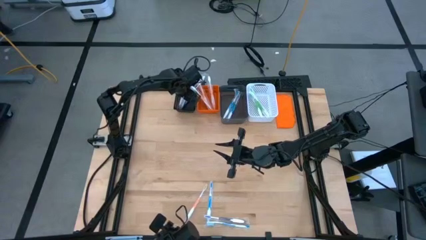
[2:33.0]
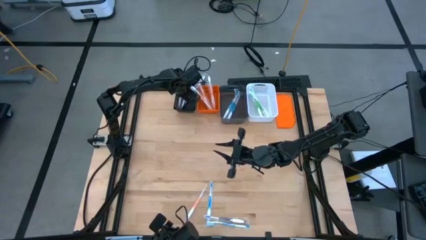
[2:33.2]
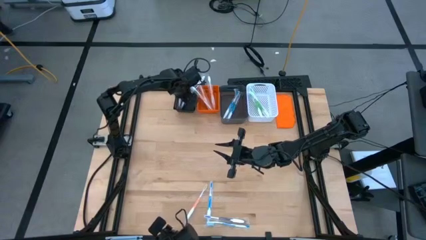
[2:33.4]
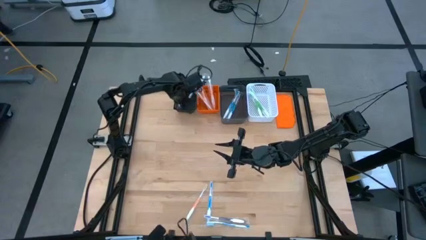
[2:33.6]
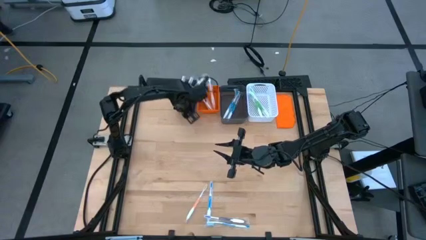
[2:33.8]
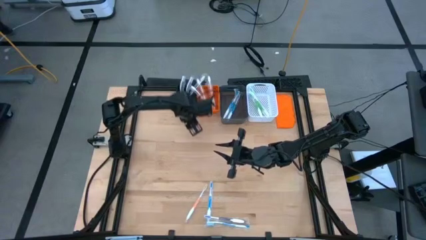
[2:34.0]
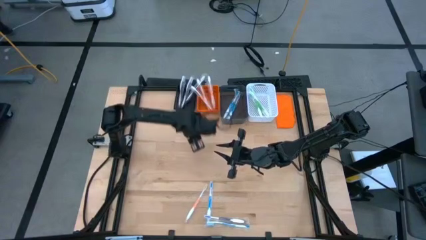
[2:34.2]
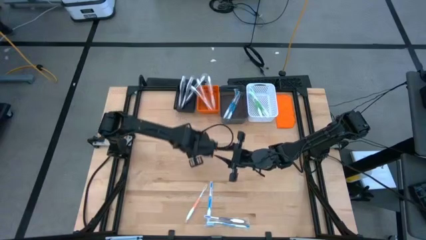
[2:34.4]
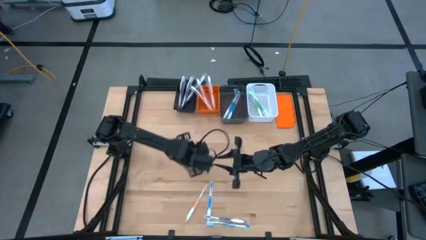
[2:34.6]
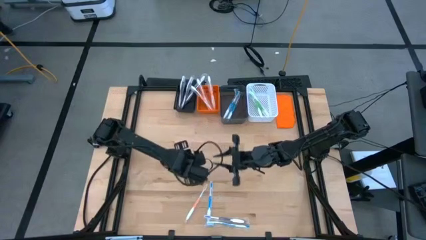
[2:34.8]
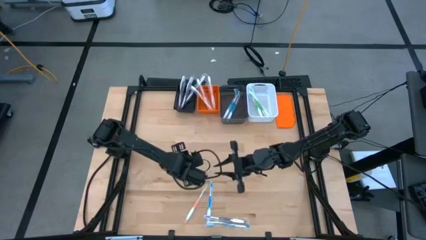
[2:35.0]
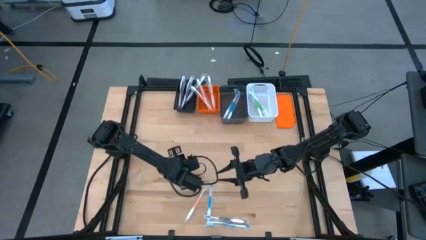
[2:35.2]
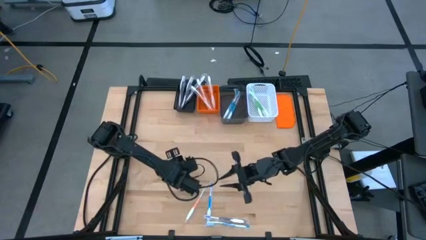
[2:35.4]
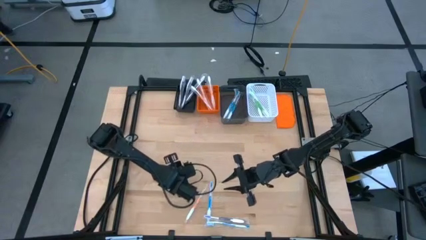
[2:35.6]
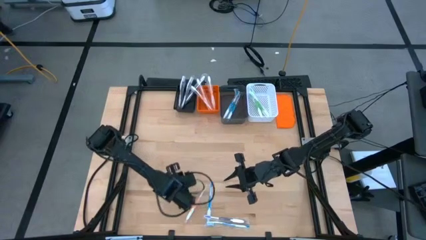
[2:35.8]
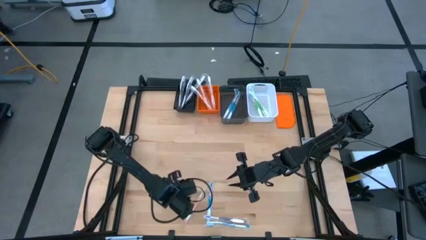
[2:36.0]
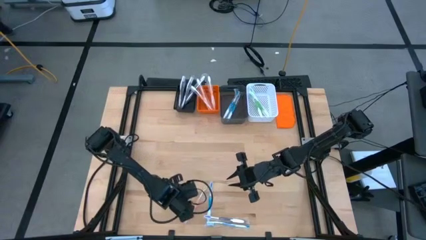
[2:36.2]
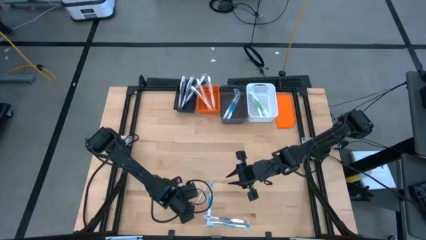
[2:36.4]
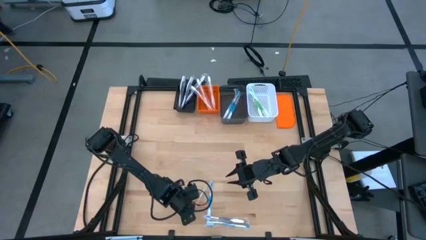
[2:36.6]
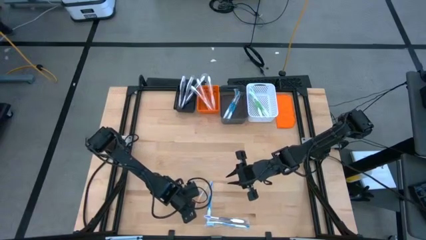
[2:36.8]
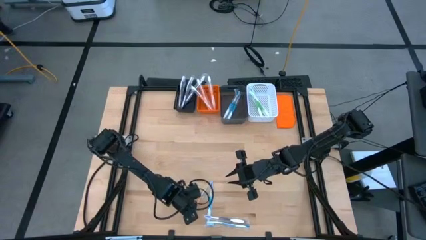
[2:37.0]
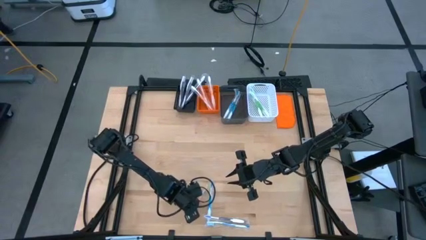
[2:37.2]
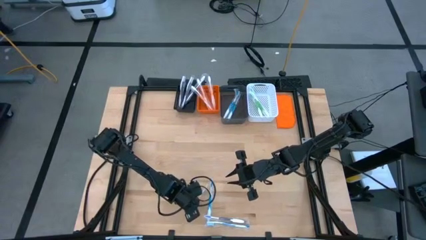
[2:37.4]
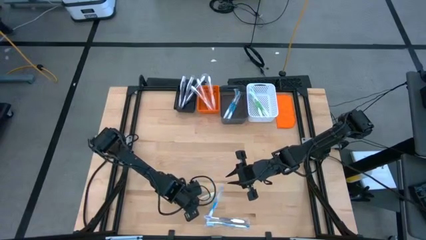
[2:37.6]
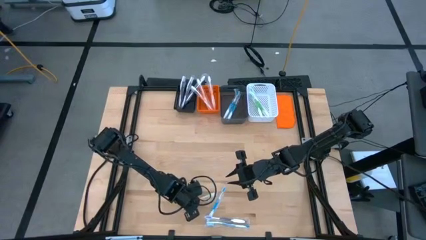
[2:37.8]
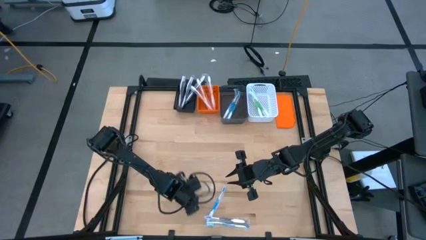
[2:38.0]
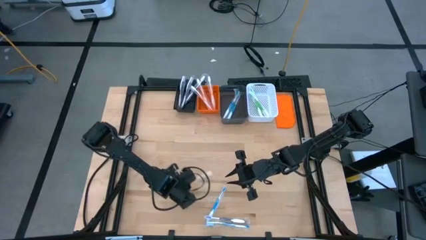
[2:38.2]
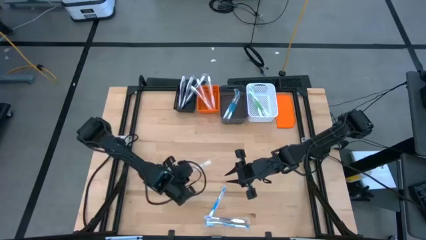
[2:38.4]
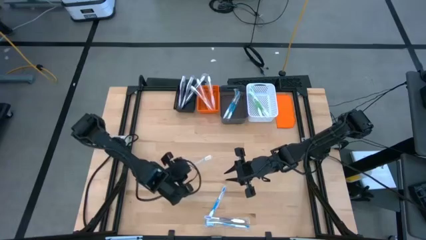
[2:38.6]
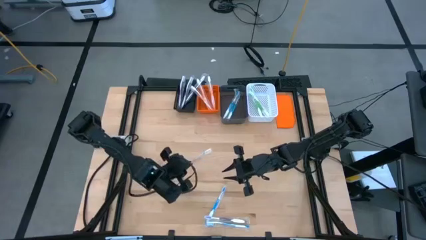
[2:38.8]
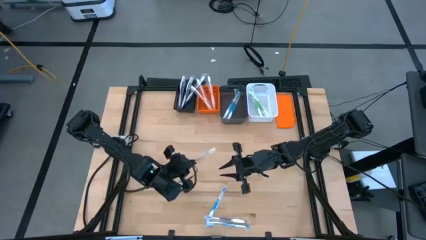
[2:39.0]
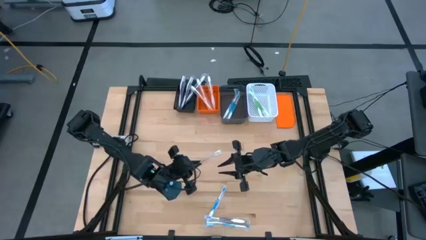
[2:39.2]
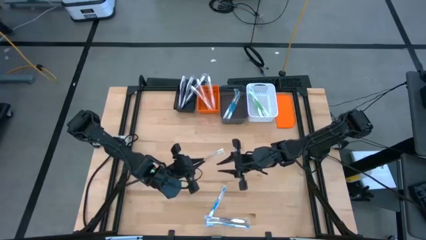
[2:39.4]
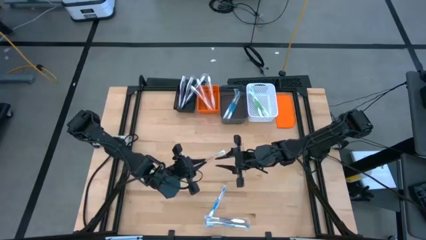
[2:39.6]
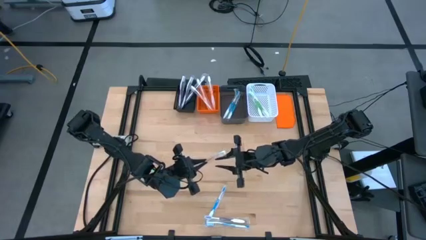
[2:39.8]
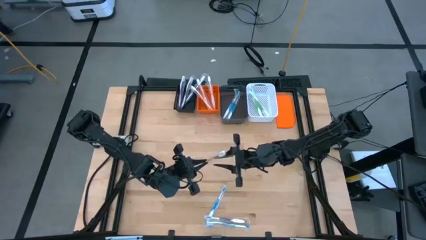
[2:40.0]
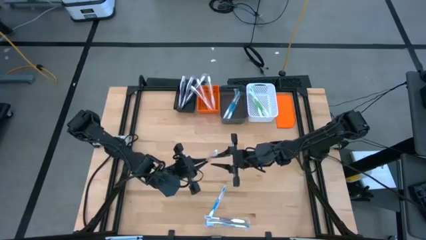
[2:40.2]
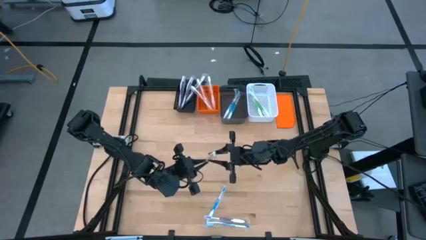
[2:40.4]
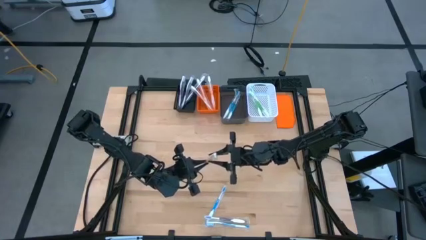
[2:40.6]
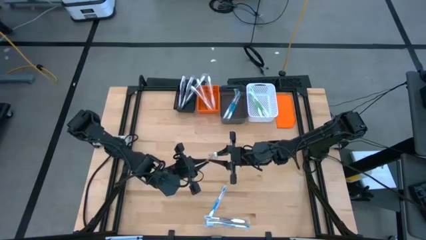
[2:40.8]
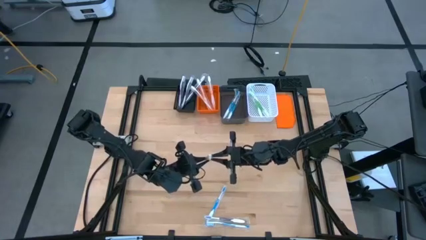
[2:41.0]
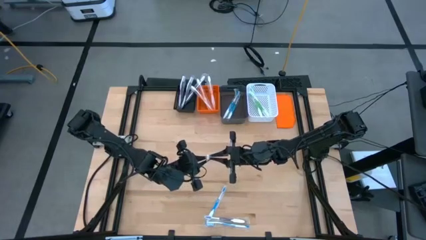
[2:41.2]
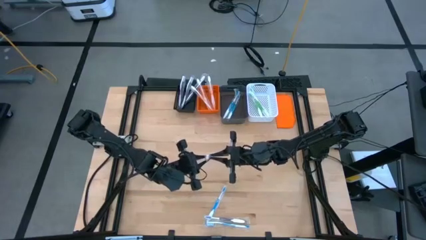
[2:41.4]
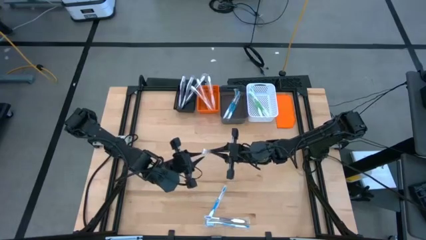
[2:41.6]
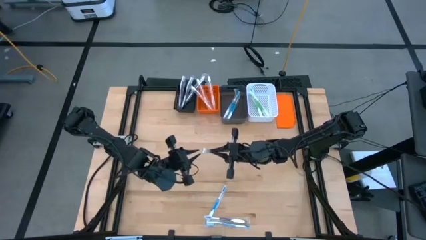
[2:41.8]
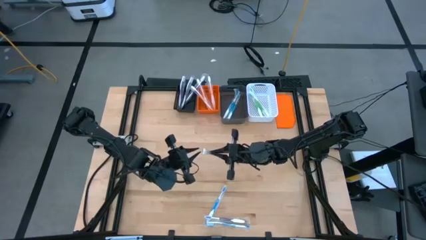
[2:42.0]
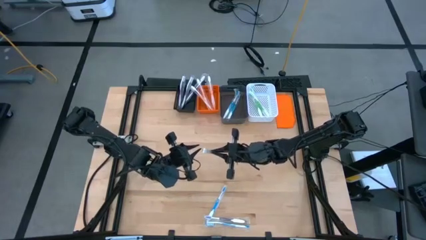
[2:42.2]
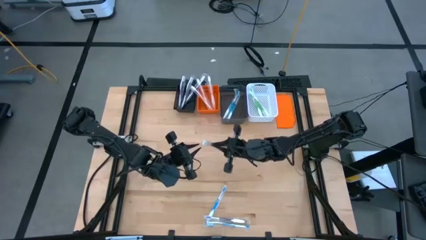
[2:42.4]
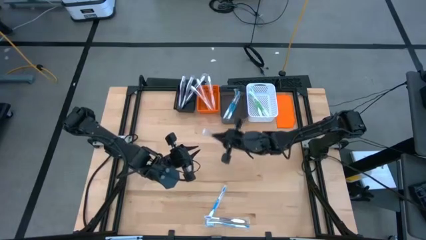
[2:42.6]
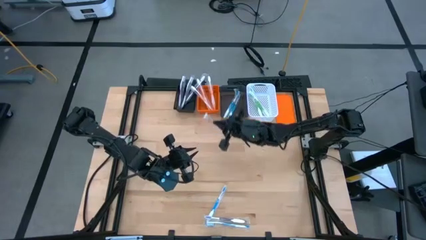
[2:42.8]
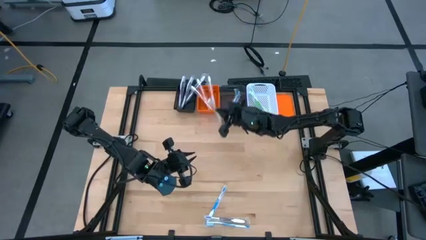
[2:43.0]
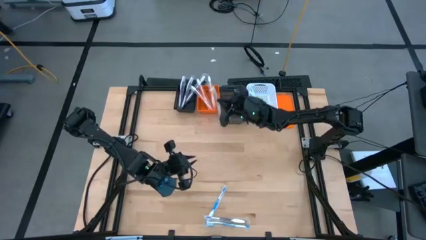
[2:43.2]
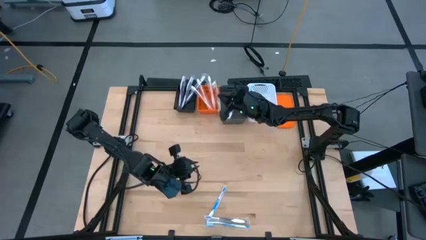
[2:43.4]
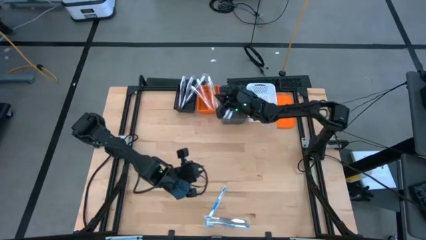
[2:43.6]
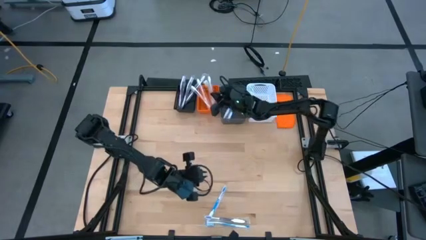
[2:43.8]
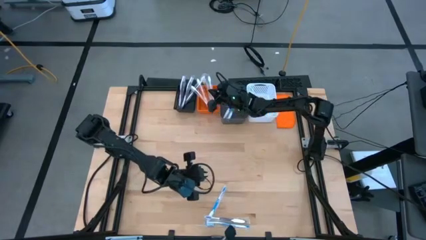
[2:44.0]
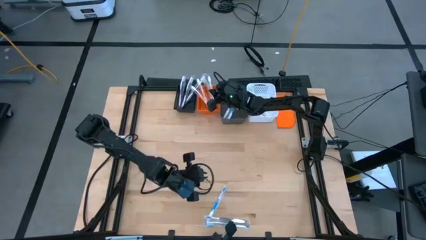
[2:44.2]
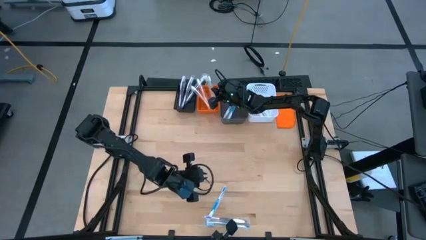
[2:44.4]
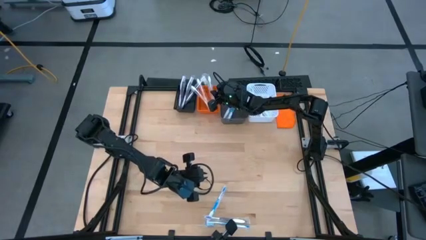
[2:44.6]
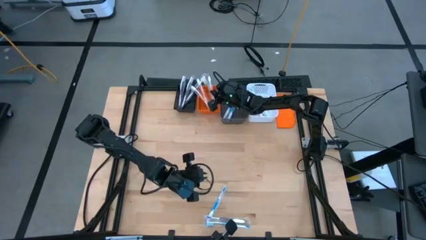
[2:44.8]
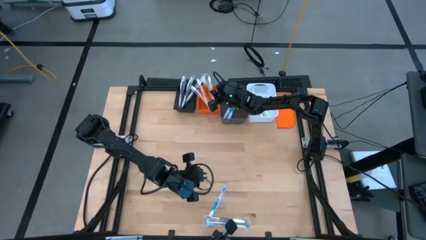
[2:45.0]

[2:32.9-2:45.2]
Task: Pick & Place Toothbrushes
Put the orange toothbrush into the orange basket

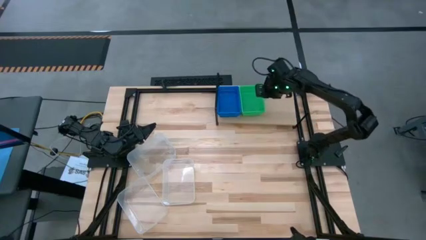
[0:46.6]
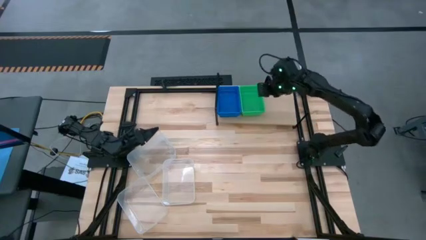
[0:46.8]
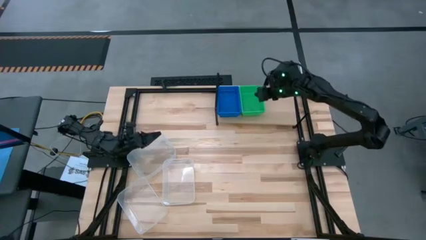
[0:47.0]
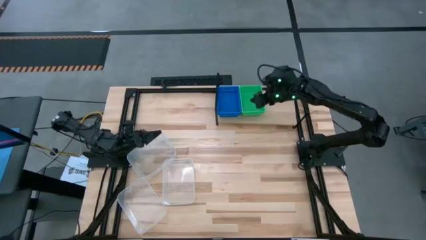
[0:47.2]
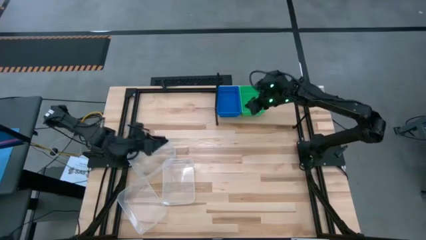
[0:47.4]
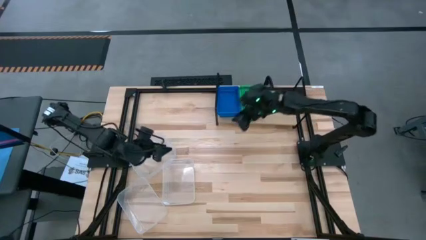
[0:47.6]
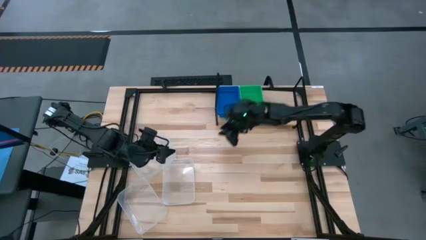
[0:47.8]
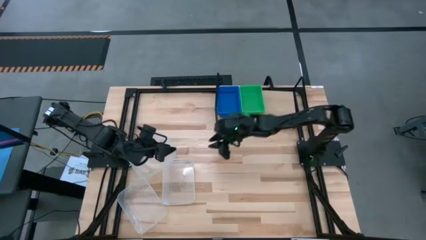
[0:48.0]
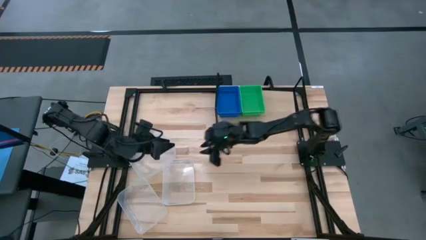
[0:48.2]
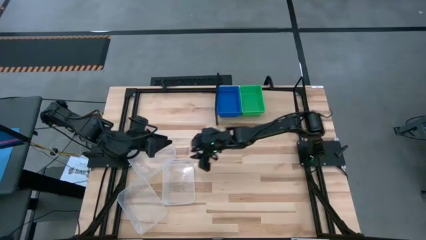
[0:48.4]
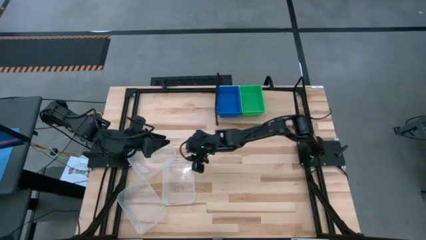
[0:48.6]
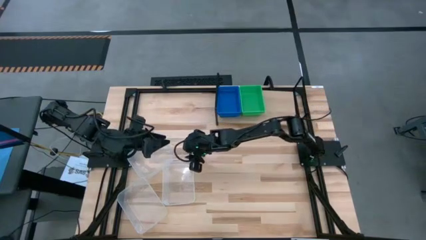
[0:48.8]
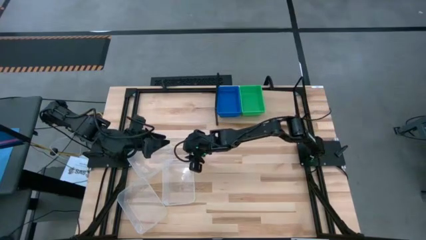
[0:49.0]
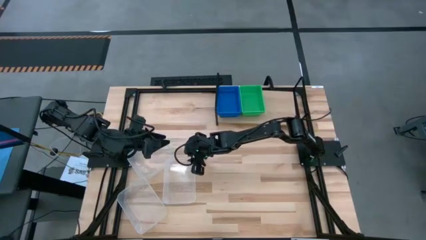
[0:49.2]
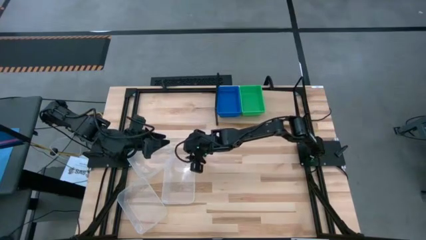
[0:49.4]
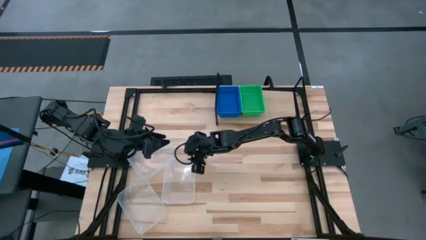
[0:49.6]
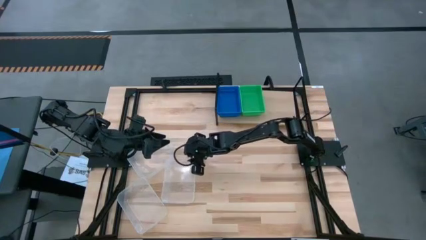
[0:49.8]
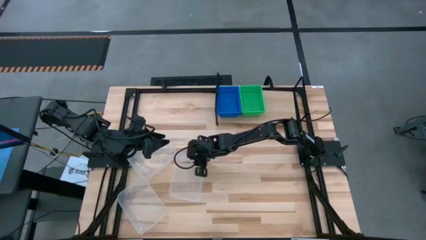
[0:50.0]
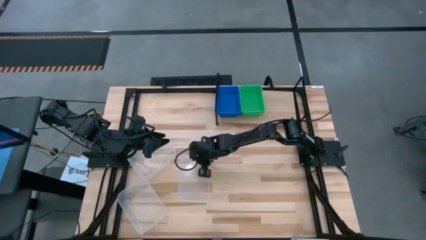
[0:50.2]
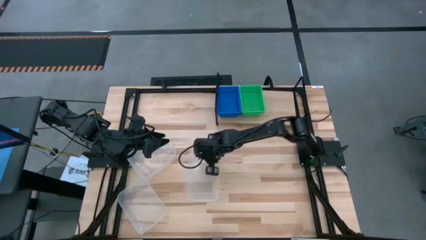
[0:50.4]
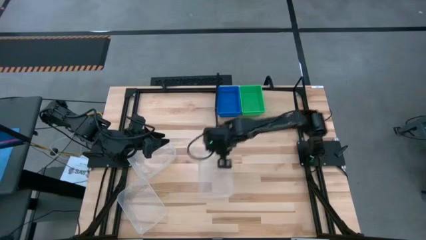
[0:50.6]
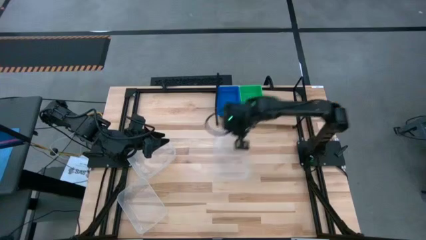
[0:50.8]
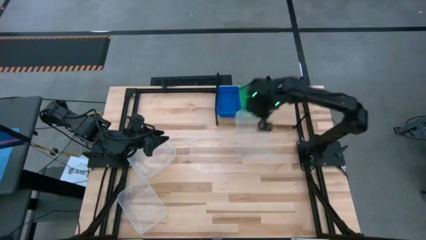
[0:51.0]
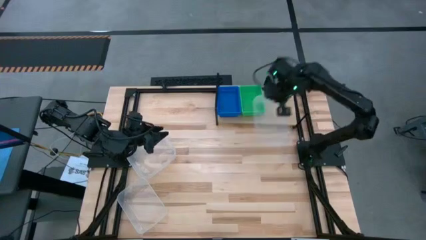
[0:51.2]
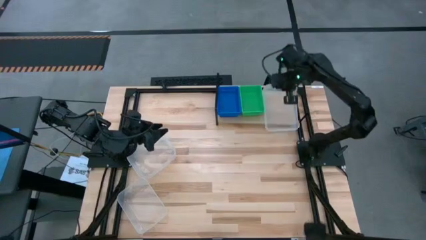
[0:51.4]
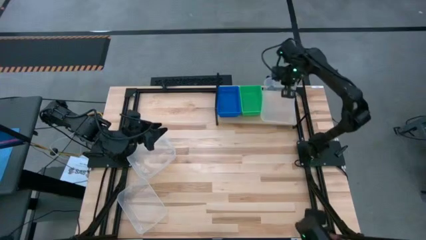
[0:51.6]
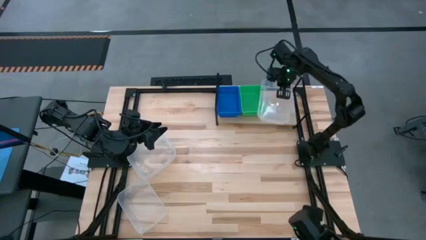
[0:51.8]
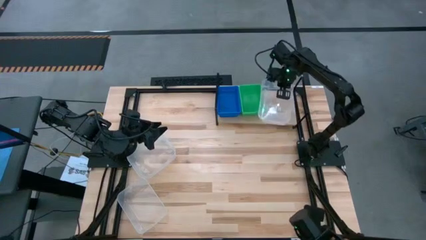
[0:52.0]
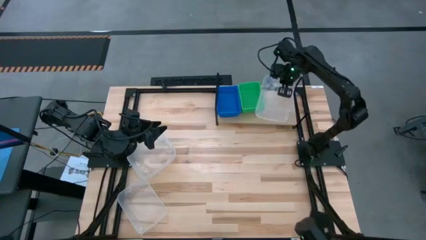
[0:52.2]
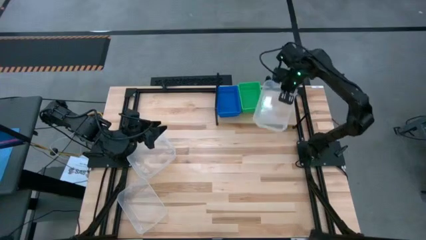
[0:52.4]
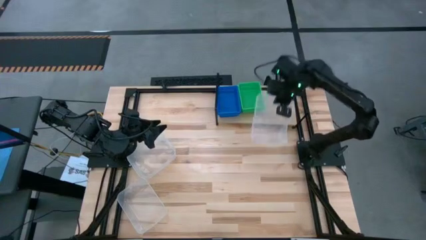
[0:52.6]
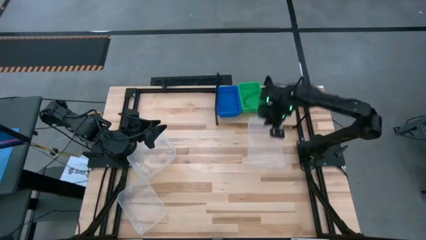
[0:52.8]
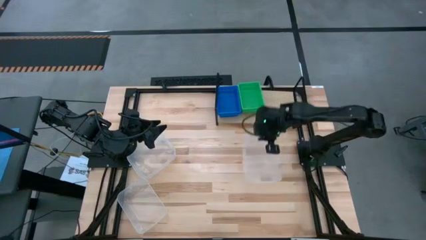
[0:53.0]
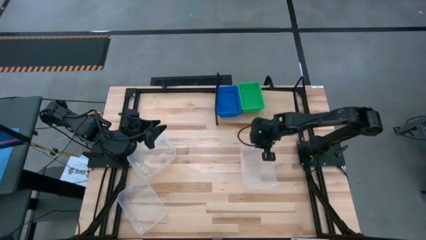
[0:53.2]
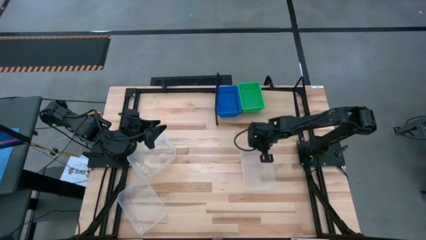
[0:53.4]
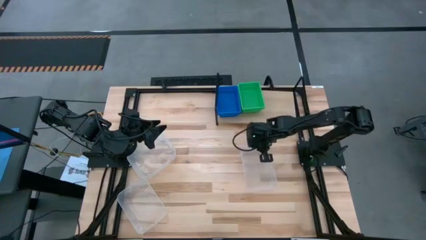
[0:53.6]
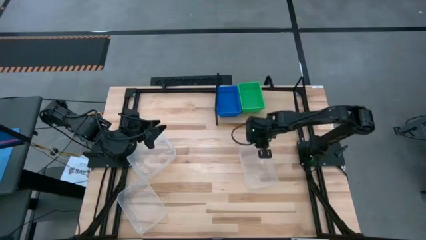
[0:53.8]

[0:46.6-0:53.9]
Task: Stack baskets on shelf by color
Put the right transparent bin on the shelf
